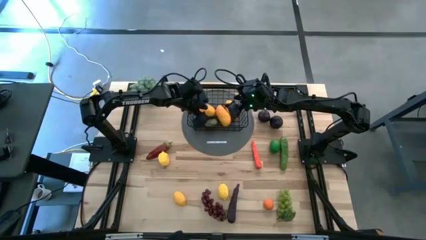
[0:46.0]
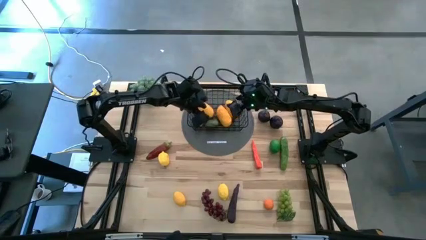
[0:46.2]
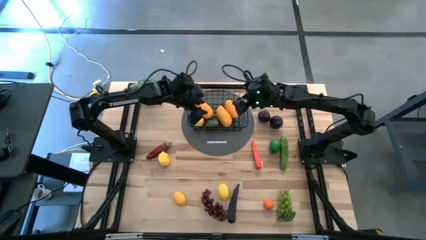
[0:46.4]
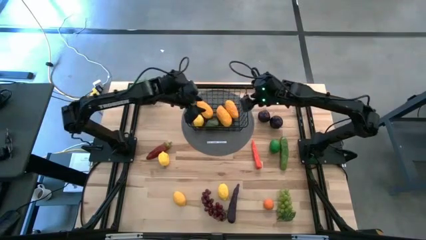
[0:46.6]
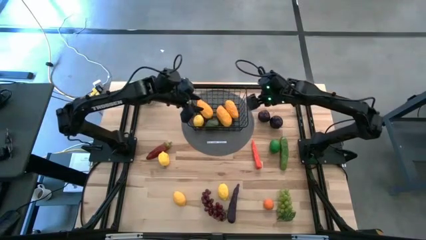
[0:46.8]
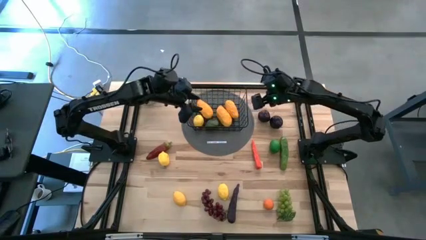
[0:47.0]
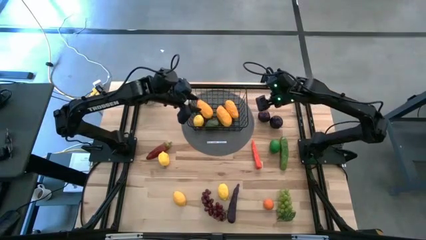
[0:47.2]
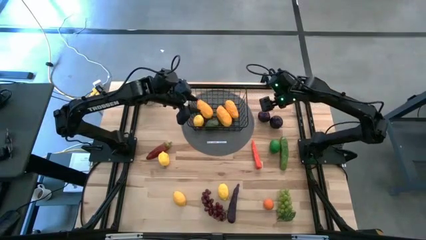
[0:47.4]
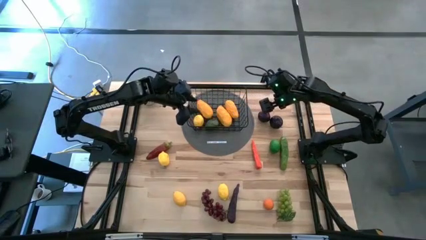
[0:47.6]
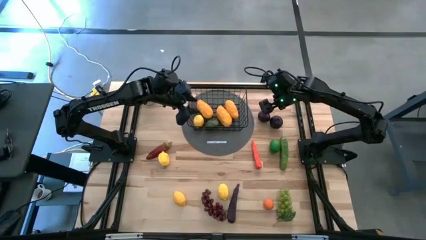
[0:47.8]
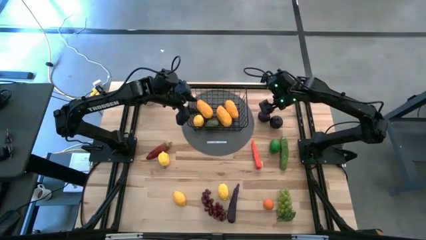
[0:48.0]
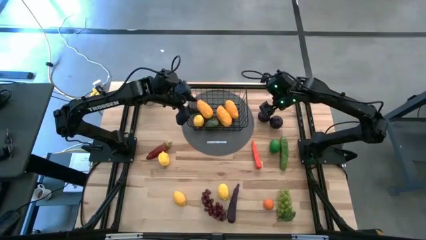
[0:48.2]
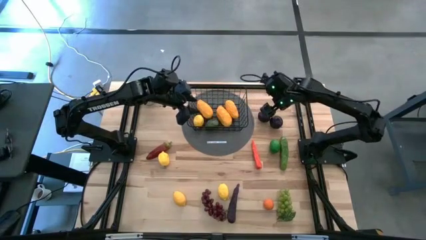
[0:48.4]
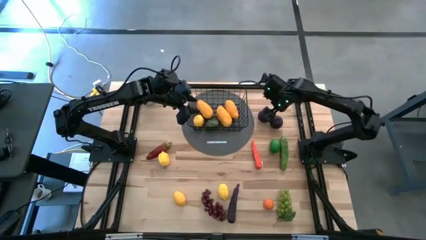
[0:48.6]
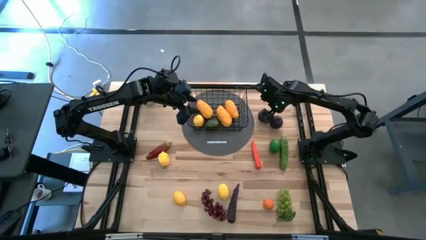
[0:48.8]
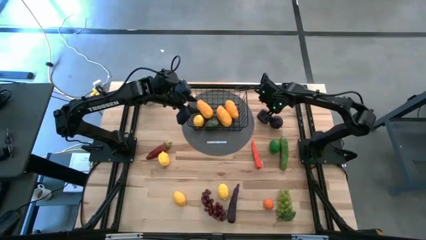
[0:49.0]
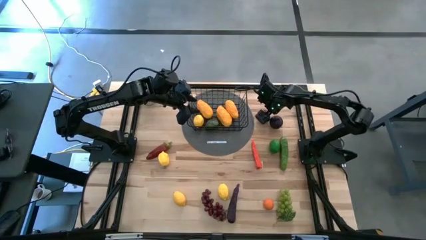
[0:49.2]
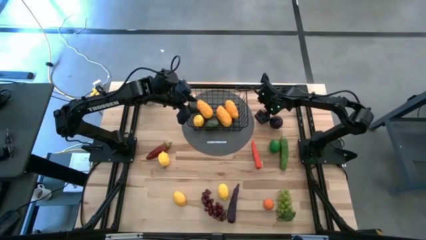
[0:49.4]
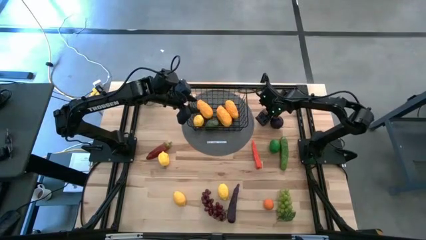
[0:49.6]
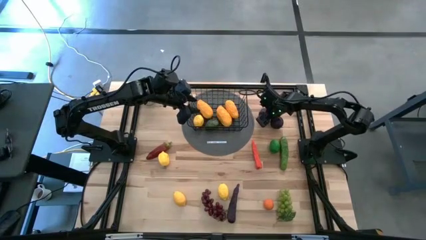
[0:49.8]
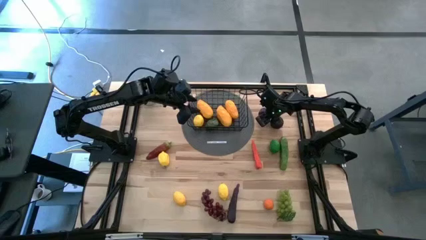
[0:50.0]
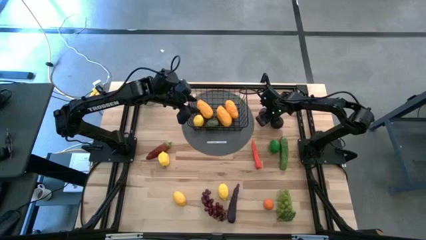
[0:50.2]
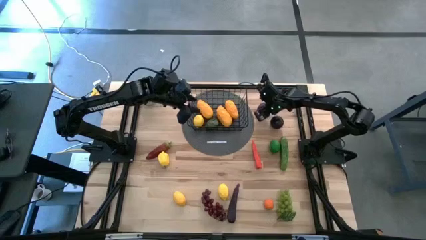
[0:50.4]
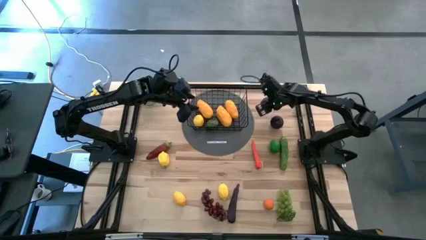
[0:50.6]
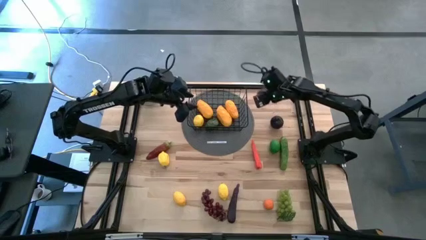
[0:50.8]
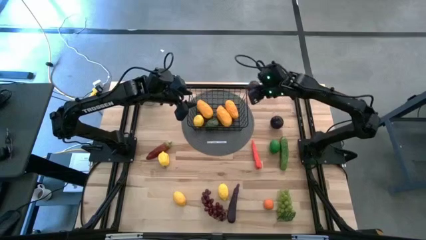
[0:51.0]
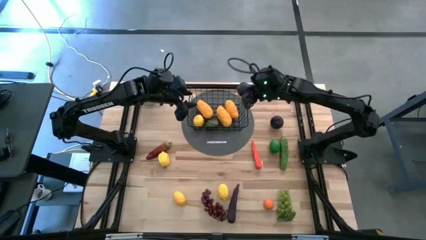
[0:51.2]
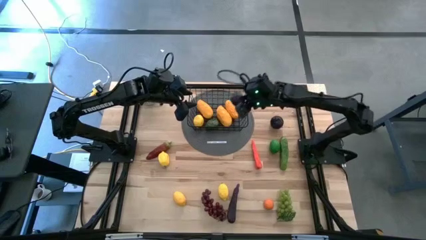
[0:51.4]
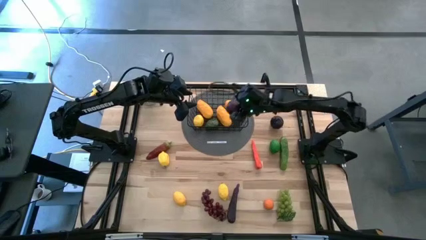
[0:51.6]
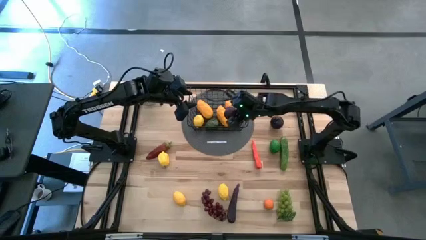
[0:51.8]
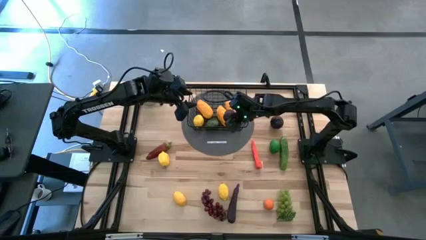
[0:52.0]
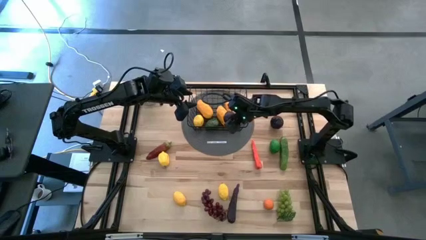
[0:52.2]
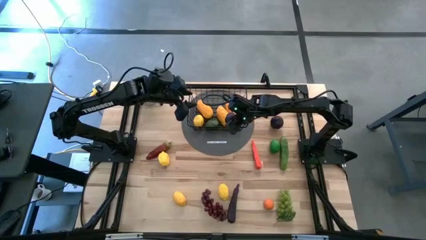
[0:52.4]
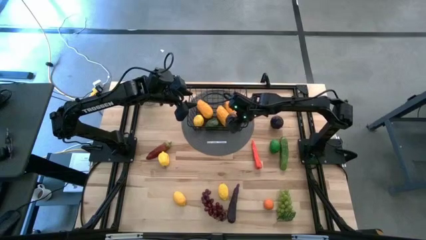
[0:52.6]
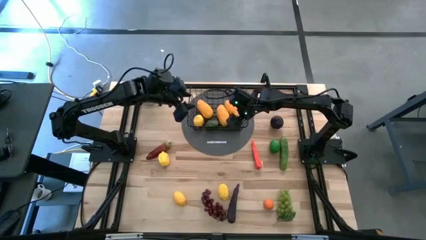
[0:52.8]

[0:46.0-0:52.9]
Task: Build produce basket
Put the left purple beetroot into the black wire basket

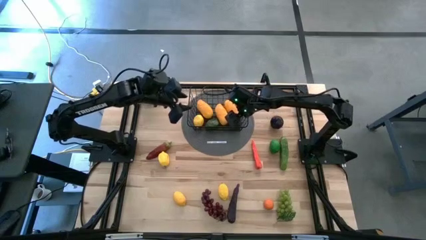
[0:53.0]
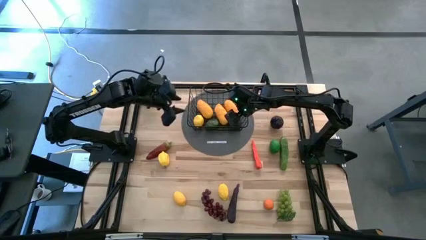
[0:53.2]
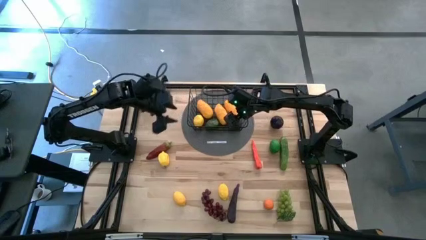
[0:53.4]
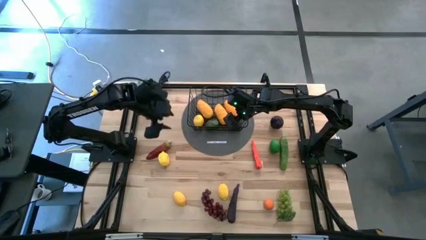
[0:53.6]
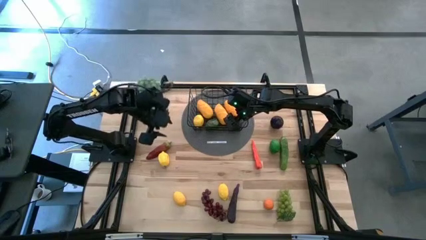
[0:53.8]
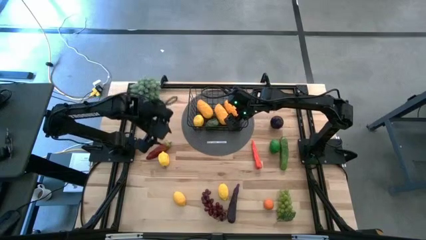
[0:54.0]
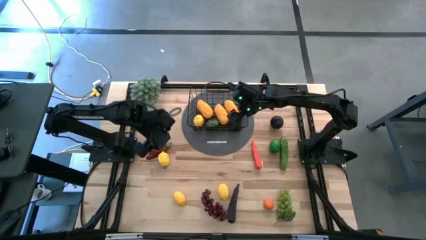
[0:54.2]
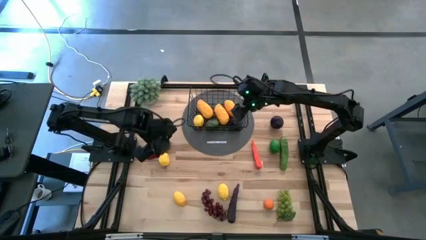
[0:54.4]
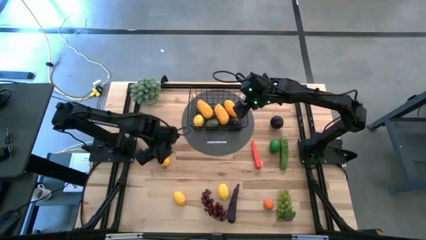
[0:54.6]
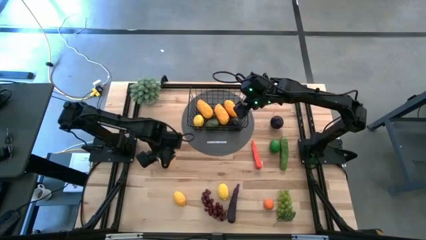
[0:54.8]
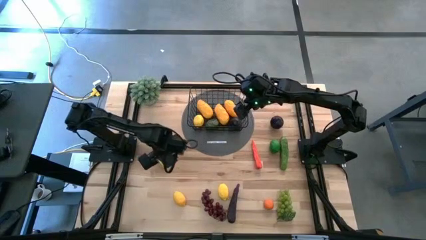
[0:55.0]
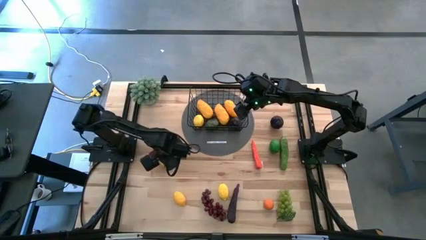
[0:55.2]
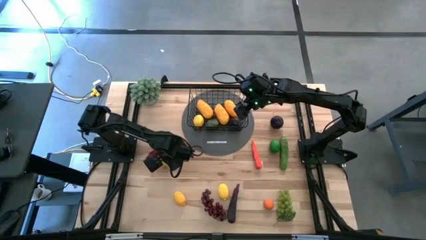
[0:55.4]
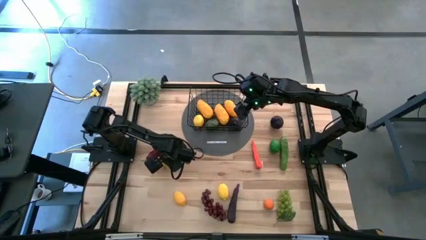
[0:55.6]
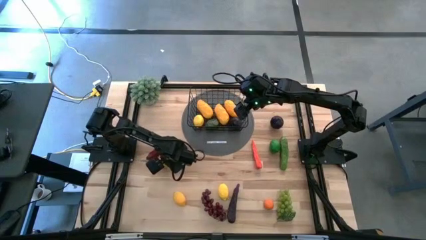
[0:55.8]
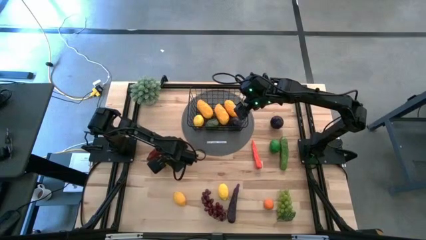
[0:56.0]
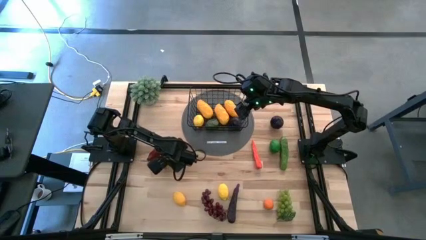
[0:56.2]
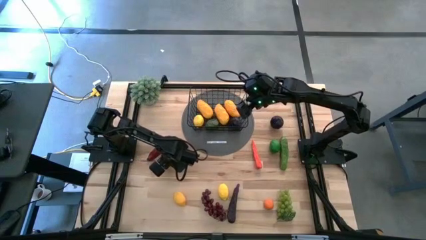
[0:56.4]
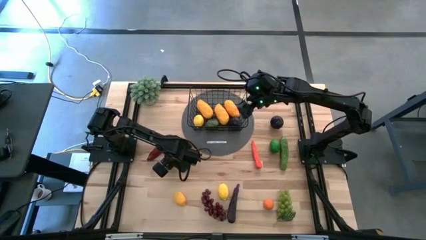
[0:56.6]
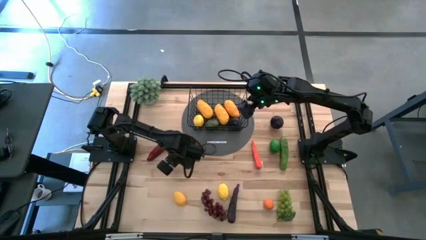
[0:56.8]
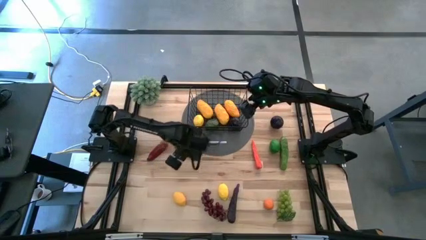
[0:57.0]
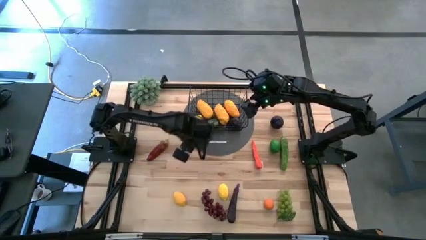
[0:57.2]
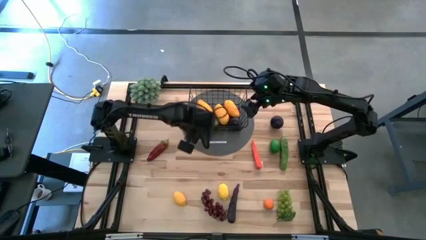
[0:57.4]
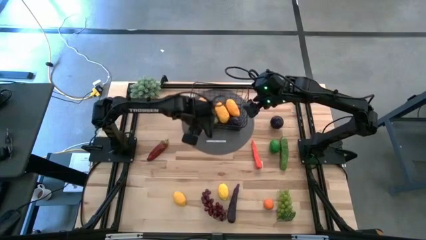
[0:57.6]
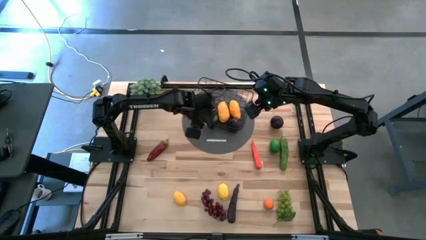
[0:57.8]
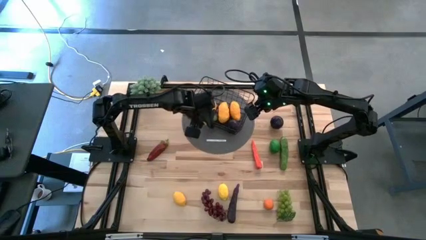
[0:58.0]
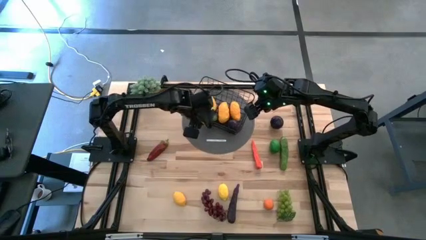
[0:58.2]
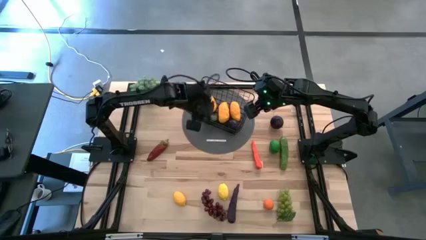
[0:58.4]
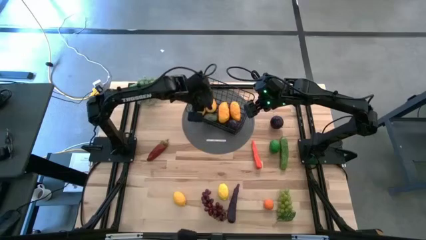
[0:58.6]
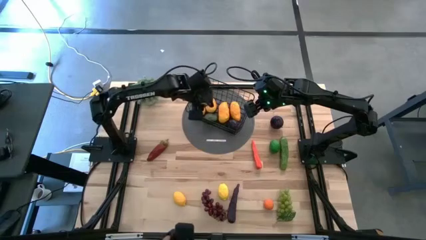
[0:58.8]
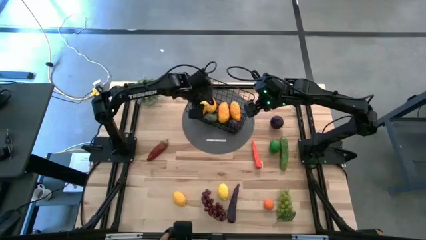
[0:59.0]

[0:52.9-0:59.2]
Put the top left yellow lemon into the black wire basket

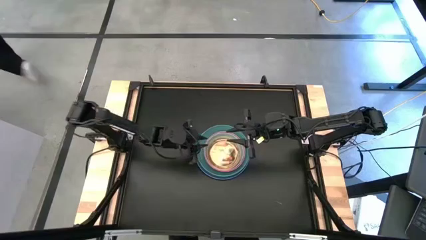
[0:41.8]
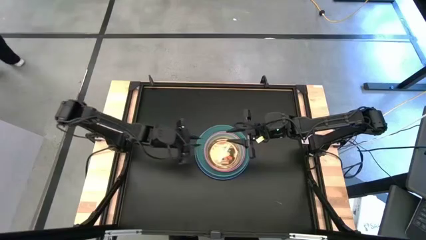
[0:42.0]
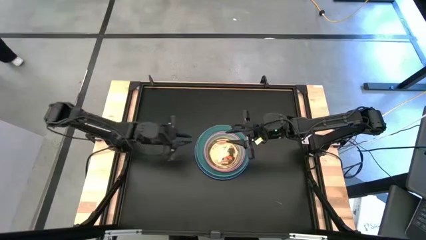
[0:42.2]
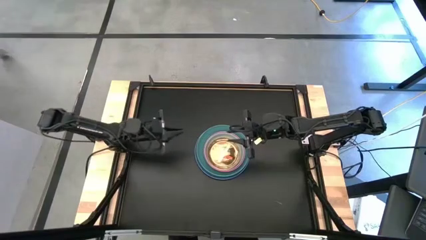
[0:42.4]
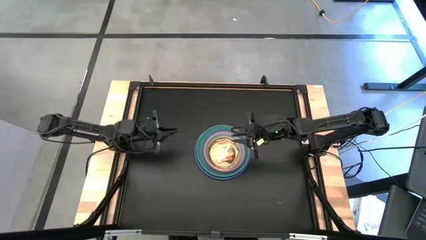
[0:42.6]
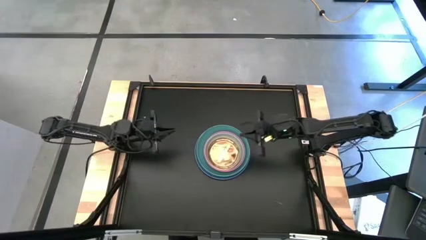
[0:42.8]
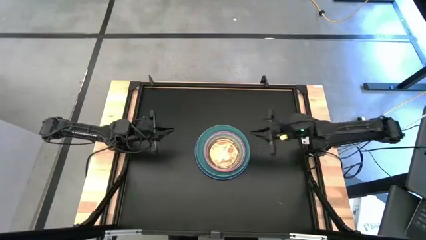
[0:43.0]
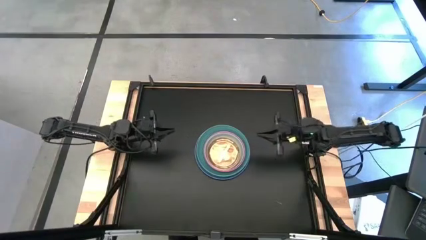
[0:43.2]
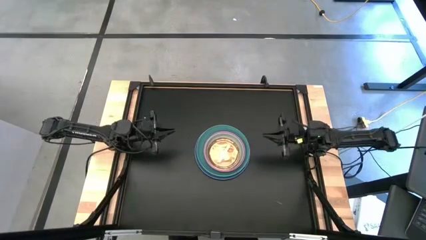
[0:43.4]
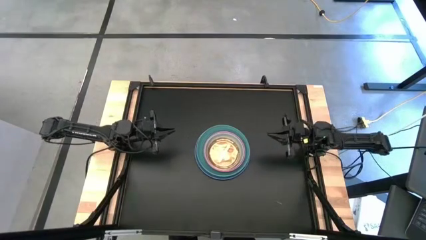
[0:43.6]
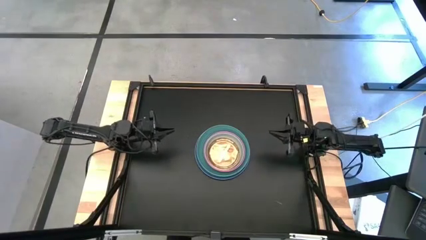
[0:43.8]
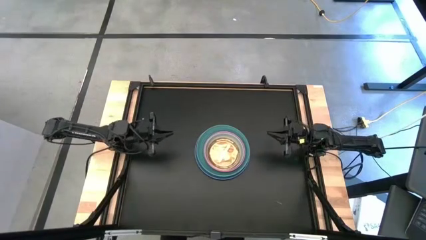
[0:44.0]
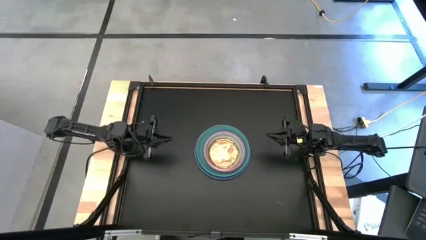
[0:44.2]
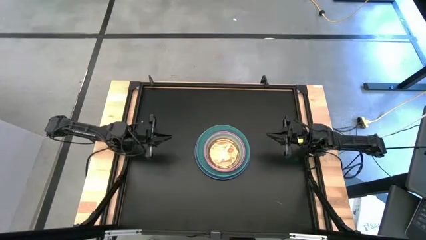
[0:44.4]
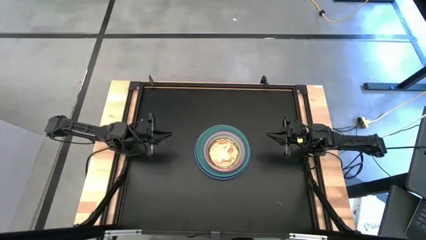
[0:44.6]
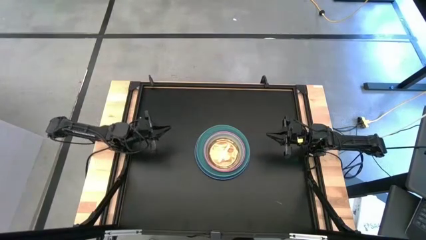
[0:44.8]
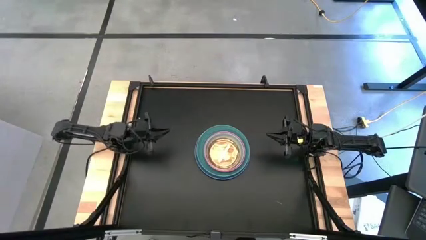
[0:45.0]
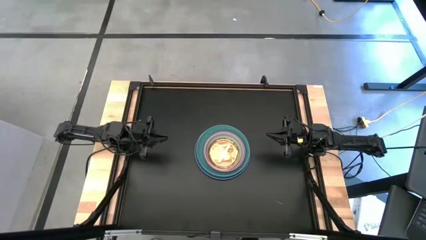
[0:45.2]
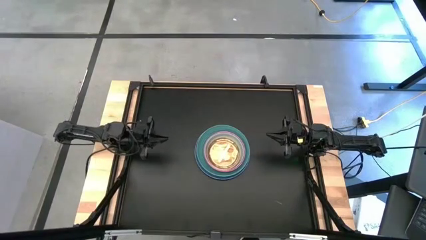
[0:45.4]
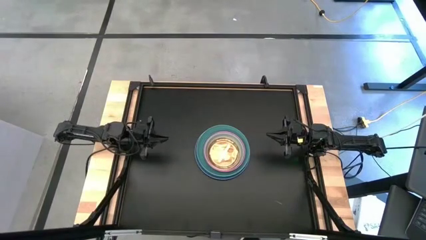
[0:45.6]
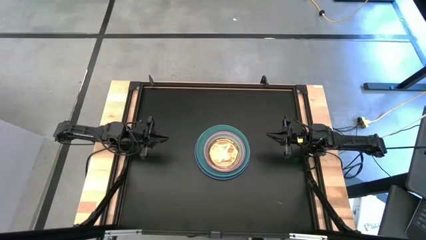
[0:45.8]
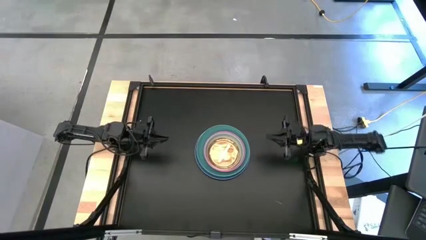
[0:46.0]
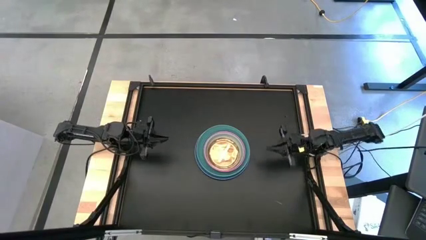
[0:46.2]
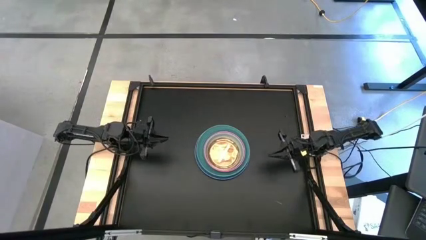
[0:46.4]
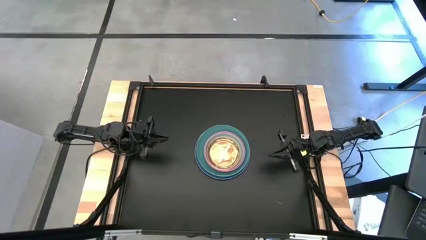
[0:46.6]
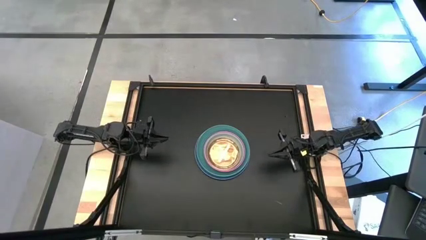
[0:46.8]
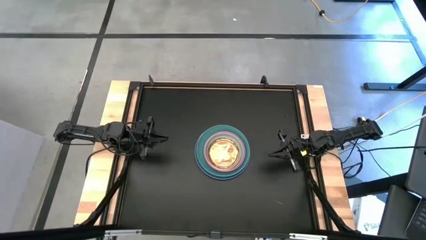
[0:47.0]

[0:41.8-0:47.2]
Task: Stack plastic plates
Return to Home Position
